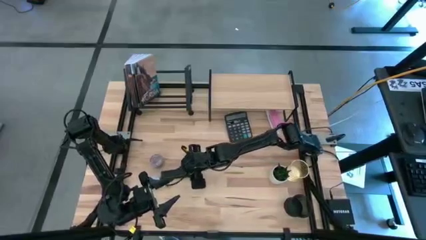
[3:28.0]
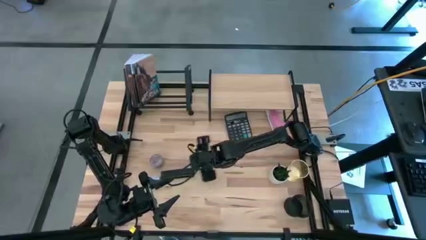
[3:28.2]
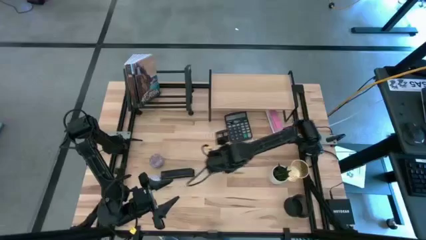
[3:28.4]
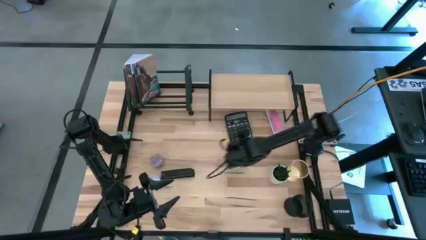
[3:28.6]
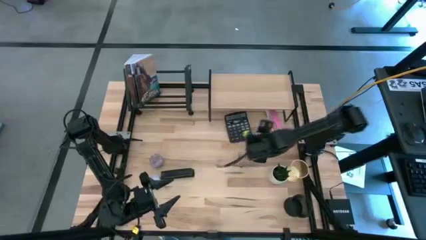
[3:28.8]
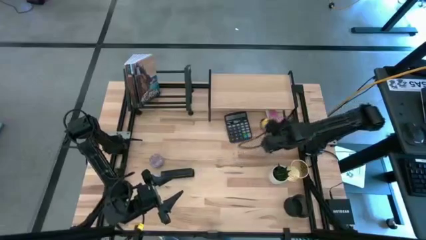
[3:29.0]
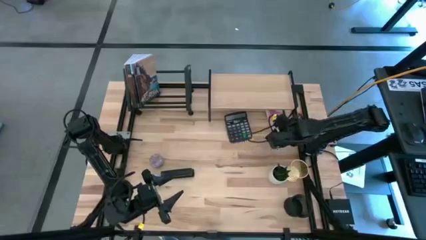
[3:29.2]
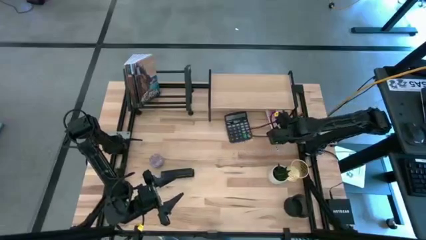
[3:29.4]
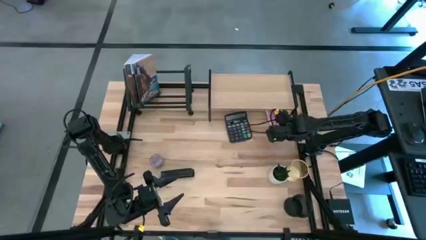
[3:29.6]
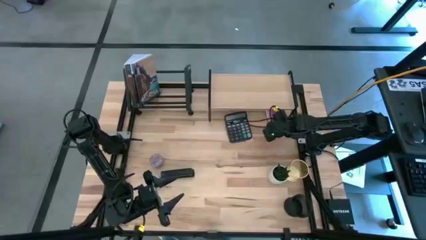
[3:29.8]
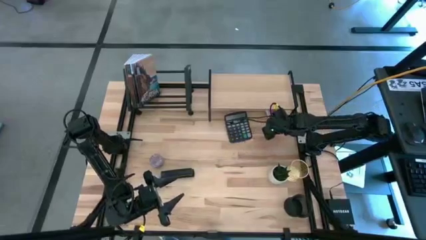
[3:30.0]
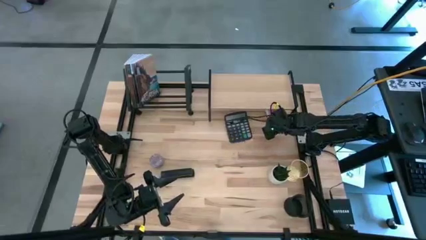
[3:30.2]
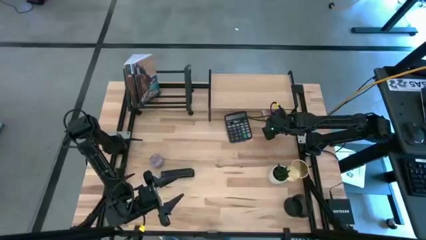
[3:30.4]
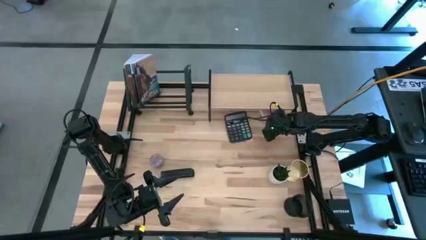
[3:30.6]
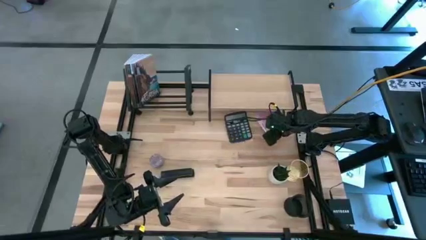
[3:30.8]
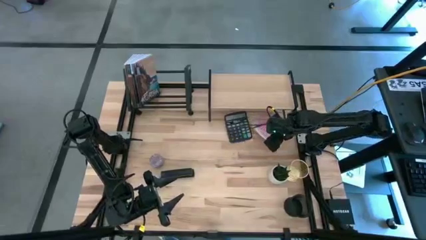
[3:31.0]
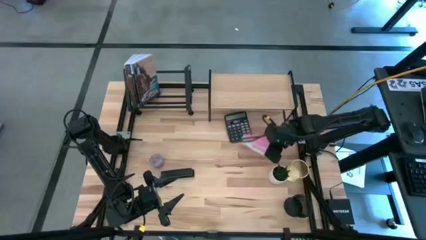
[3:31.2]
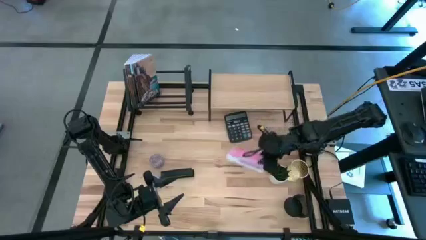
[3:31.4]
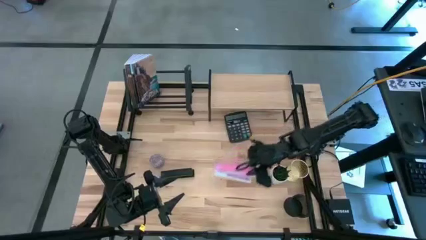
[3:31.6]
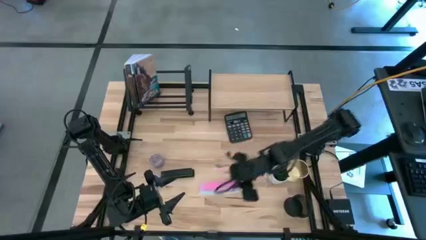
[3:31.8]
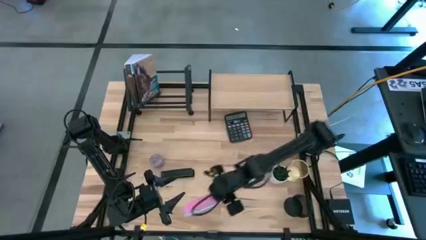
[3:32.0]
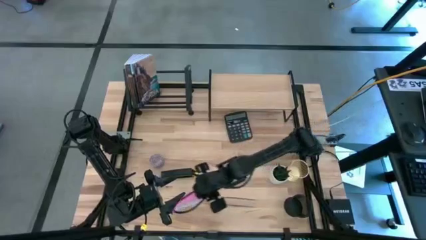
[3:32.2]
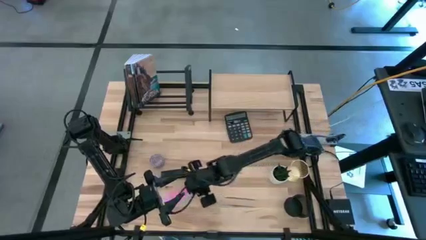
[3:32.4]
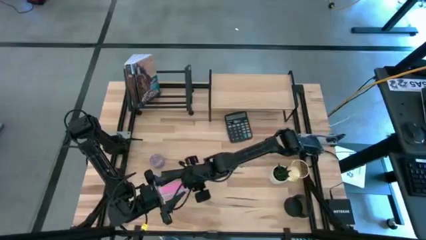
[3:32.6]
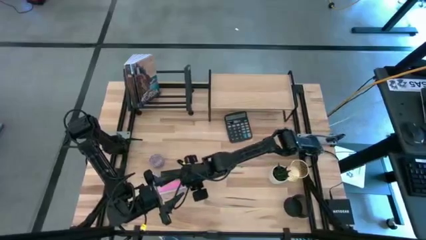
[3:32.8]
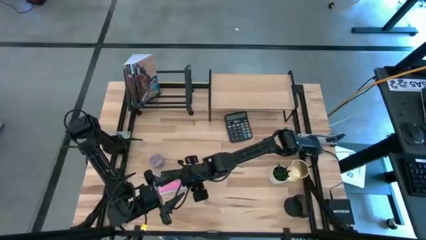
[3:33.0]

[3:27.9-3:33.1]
Task: Stock shelves
Remove the pink stapler from under the shelf

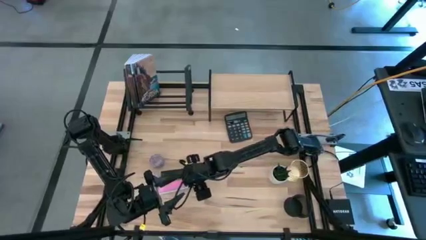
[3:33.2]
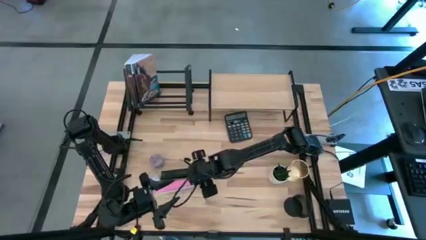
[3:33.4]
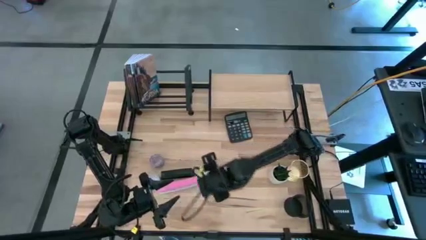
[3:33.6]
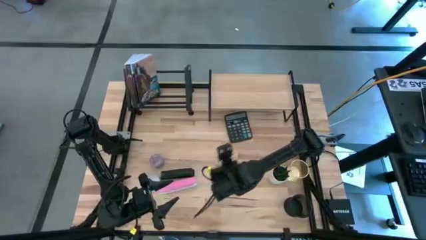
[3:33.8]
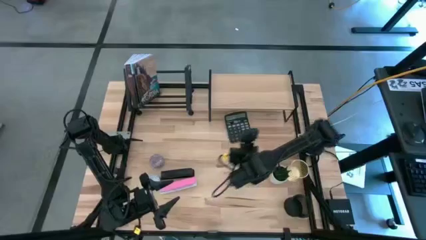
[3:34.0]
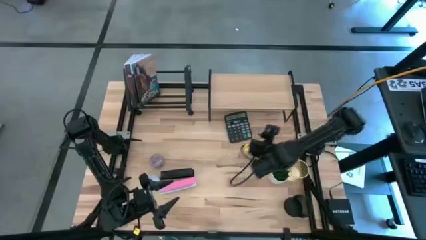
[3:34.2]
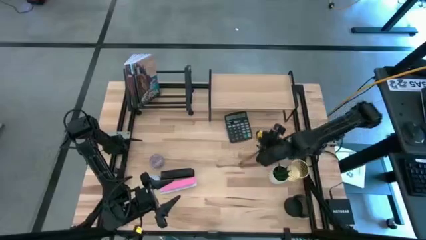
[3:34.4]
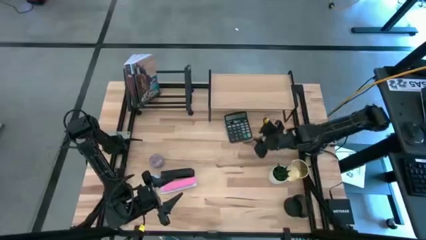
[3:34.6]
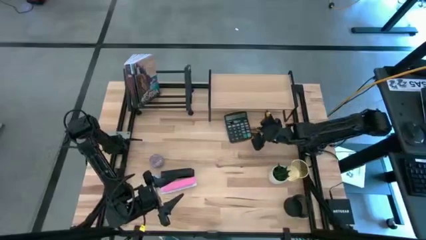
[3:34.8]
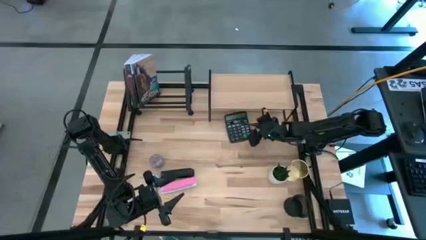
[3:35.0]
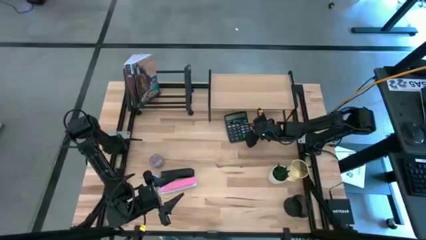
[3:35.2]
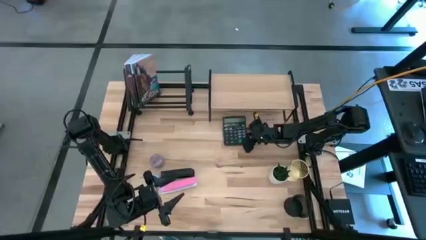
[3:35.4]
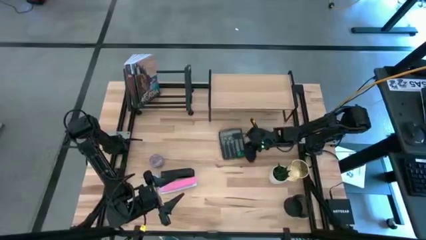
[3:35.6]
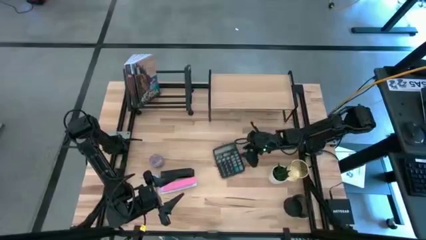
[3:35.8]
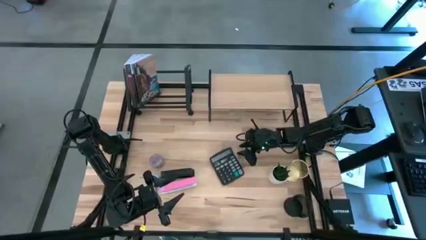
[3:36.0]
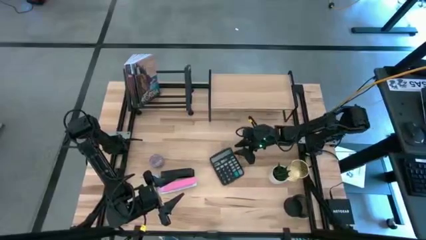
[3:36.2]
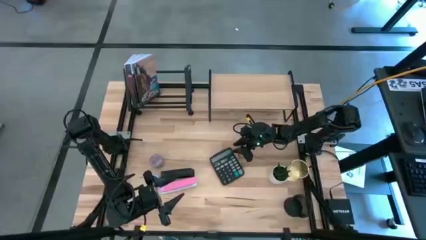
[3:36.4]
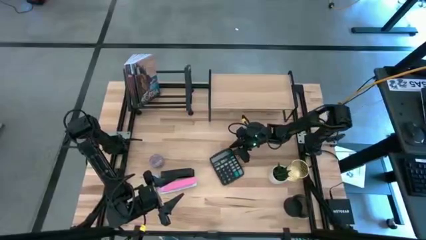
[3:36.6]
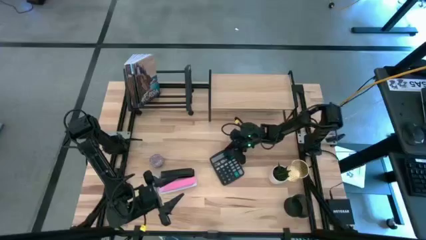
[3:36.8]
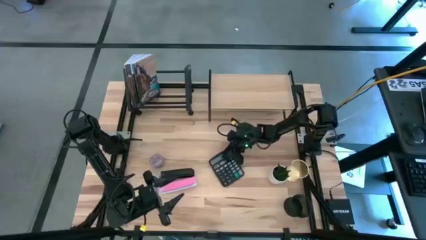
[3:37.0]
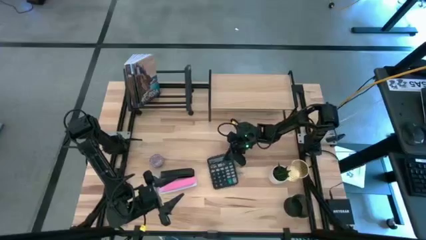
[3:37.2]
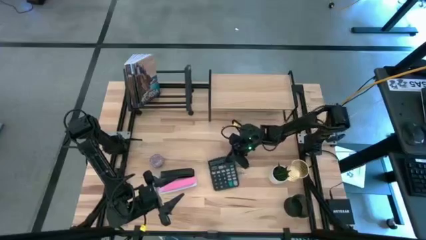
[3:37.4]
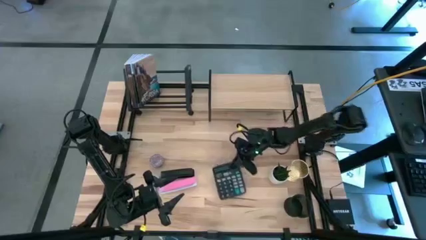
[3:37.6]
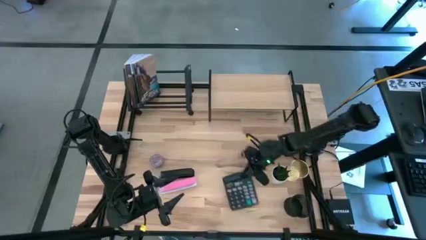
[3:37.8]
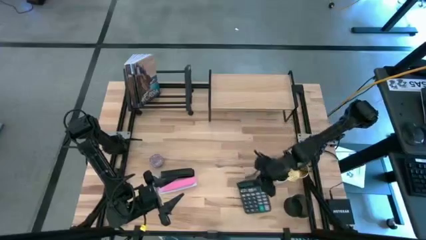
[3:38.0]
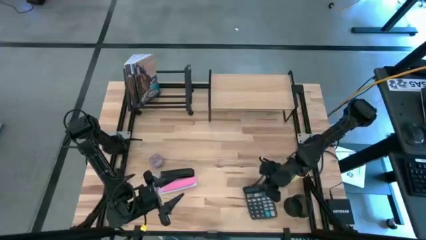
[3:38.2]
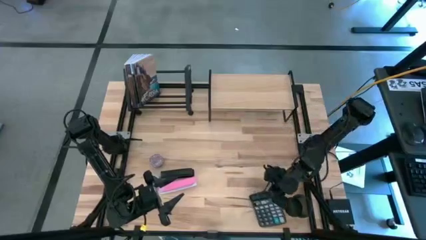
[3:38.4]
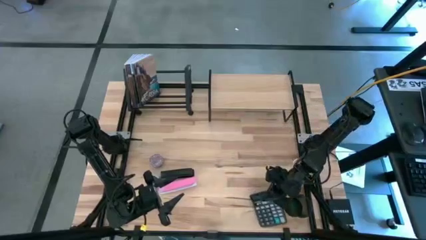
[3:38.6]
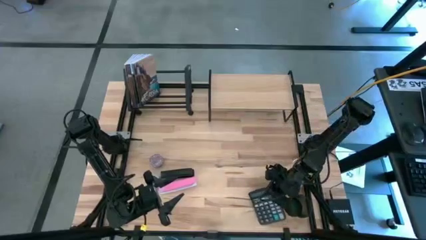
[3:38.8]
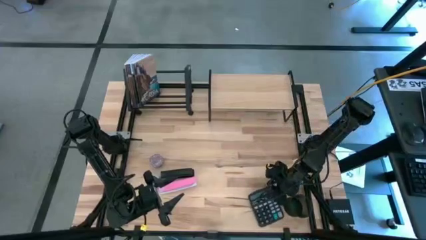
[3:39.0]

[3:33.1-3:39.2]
Remove the calculator from under the rack

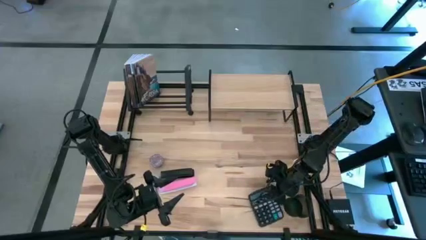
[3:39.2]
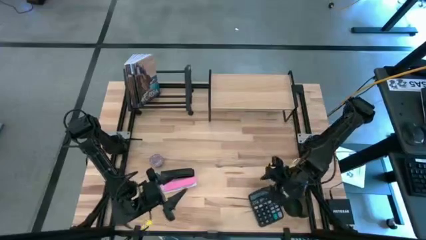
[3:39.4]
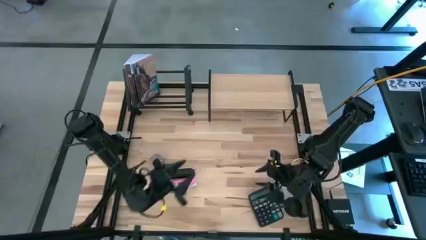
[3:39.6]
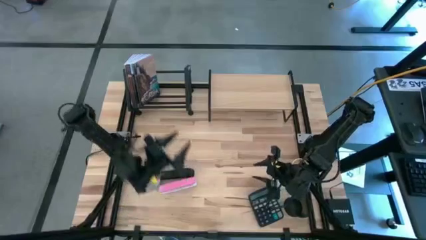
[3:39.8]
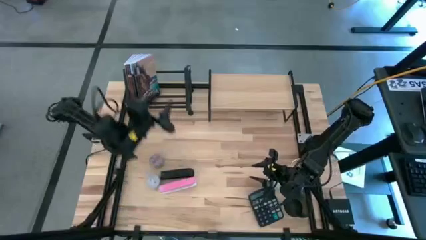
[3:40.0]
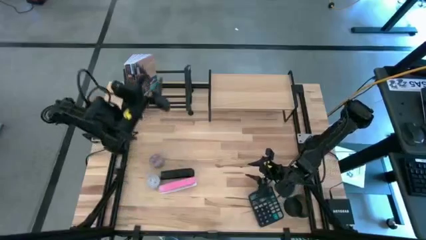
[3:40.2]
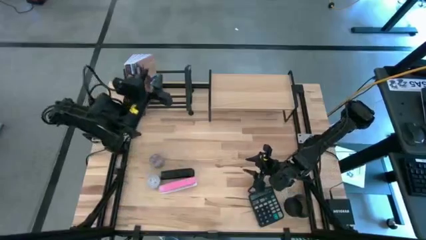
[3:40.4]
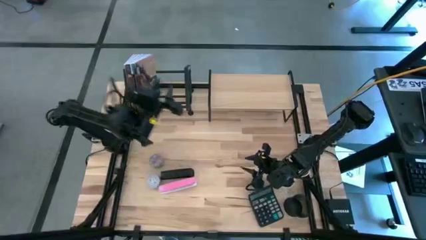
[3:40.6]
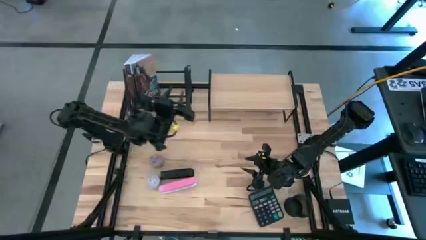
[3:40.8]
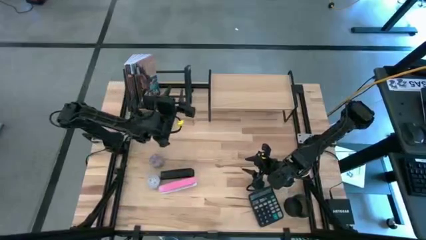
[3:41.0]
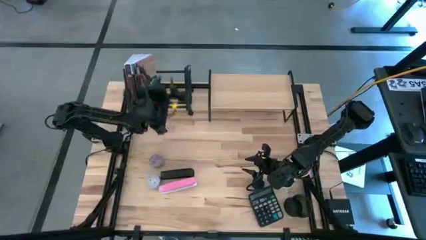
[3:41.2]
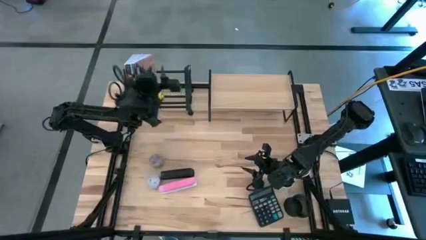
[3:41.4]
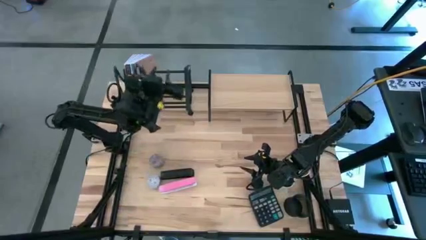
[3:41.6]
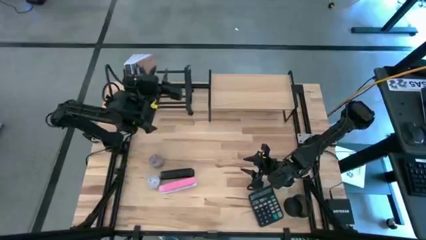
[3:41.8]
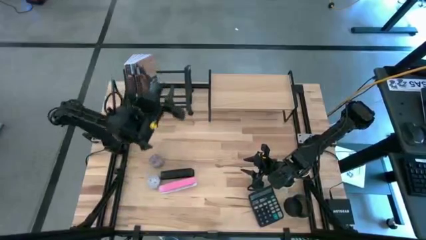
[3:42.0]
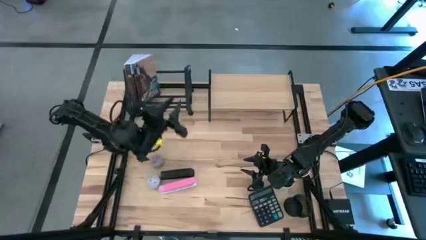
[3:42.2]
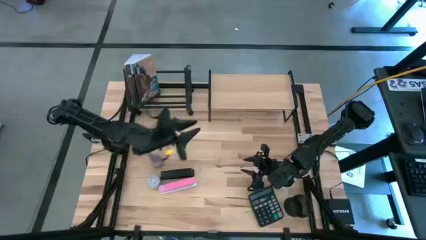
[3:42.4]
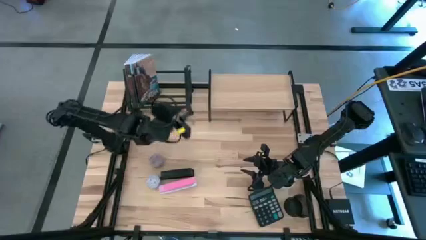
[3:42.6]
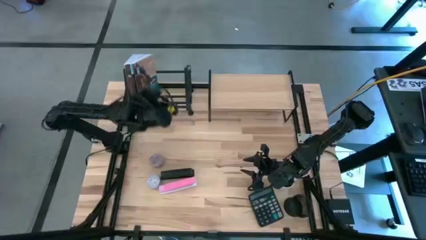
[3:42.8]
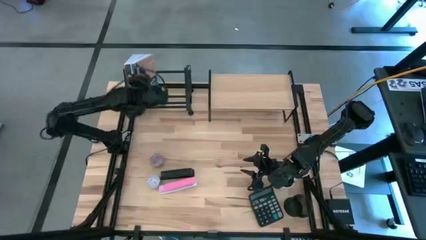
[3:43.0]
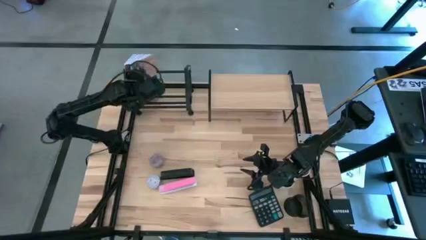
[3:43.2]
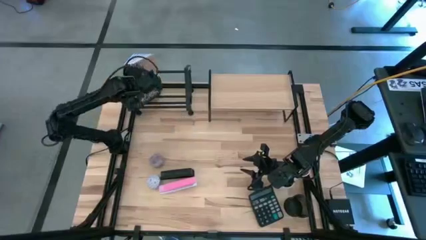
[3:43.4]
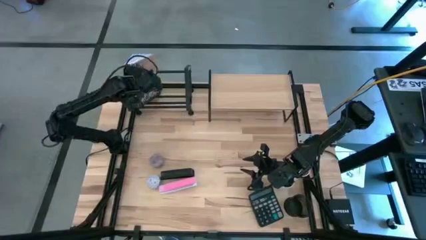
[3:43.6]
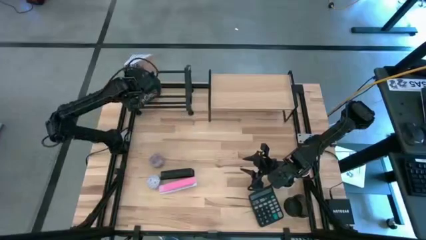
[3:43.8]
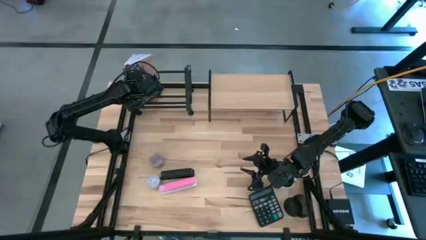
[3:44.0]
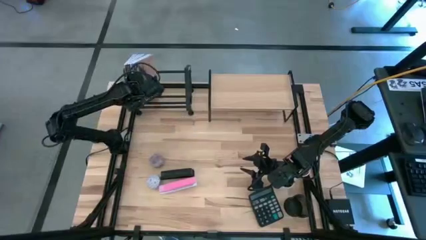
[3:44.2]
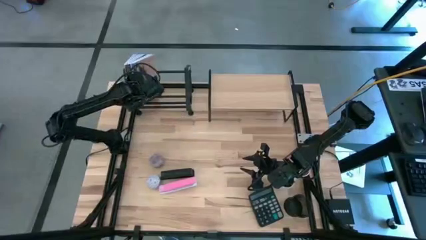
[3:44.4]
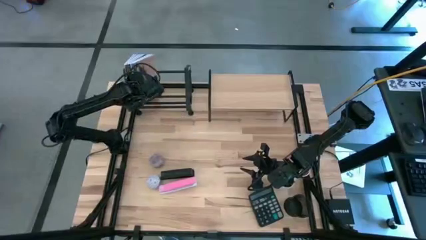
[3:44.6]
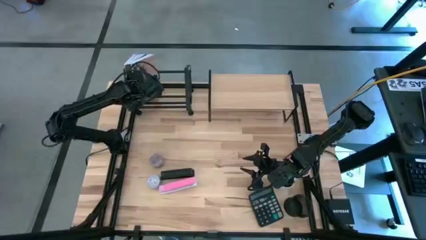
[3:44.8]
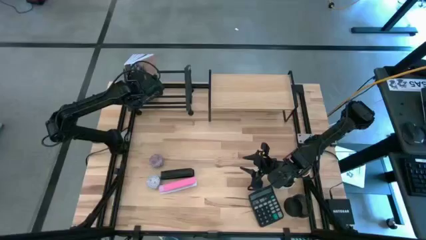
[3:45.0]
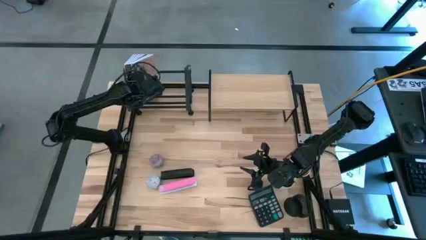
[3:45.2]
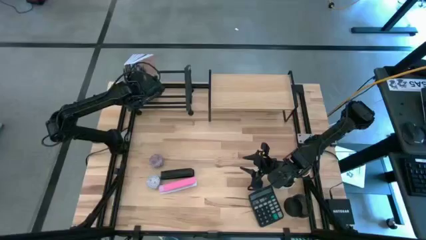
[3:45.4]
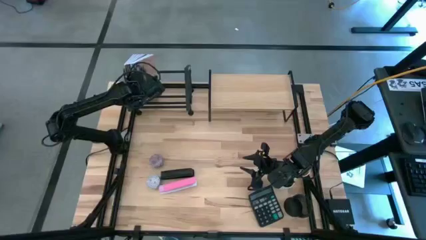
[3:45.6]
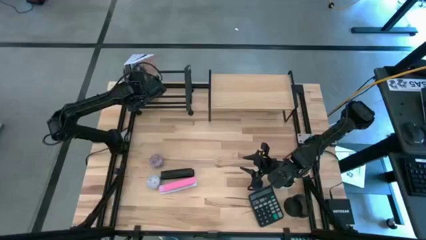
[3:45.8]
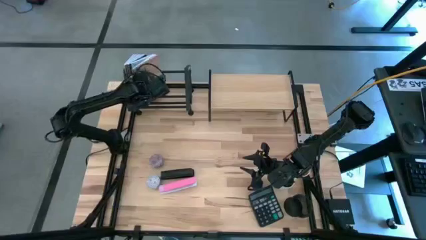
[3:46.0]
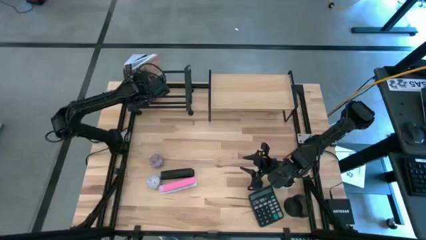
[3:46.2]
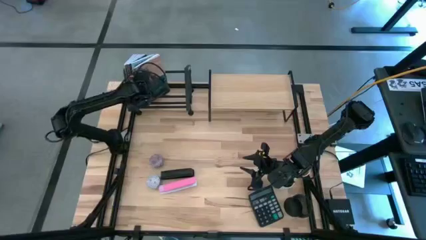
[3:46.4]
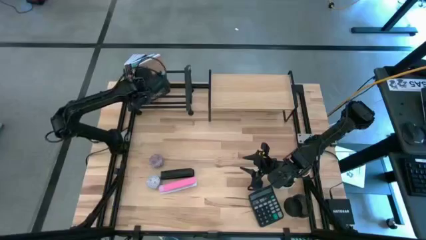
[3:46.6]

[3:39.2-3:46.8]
Remove the brown book from the book holder
